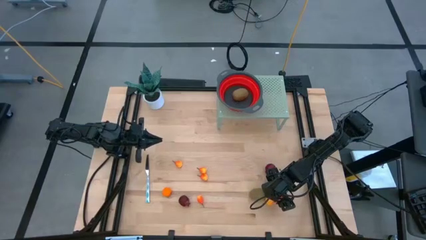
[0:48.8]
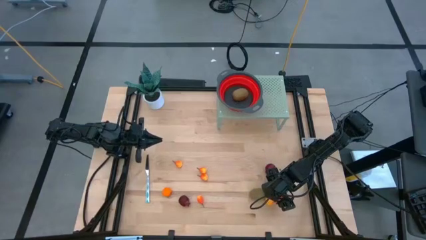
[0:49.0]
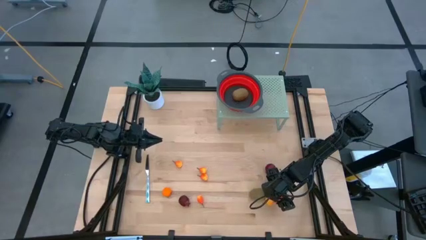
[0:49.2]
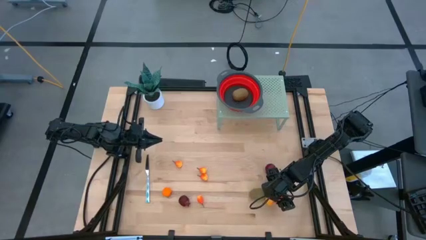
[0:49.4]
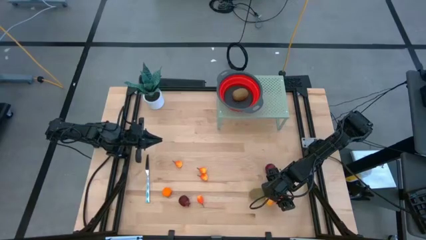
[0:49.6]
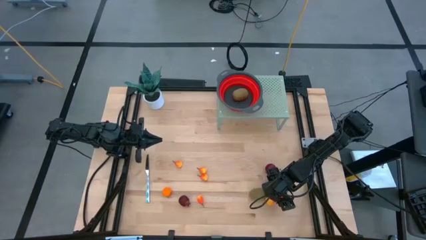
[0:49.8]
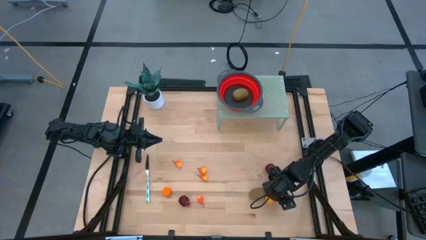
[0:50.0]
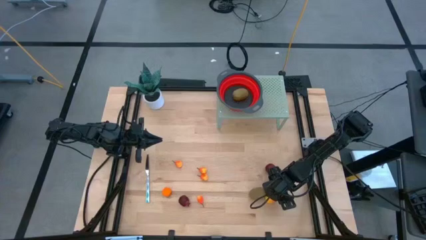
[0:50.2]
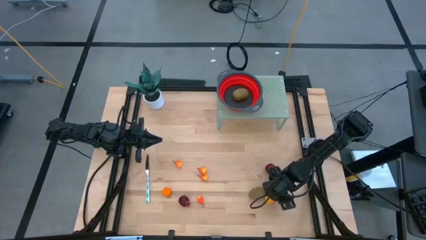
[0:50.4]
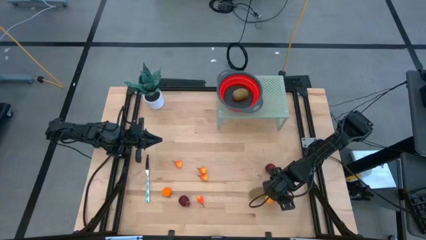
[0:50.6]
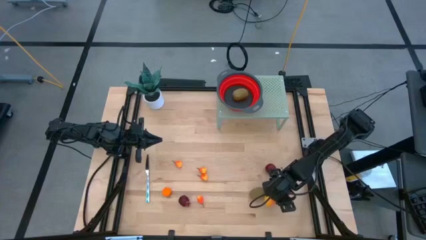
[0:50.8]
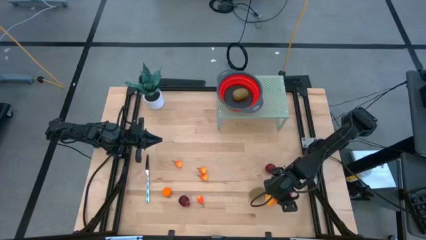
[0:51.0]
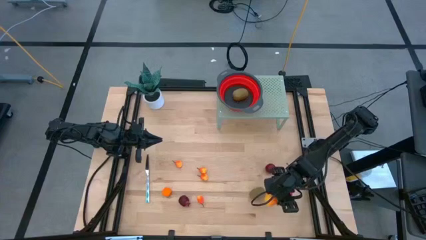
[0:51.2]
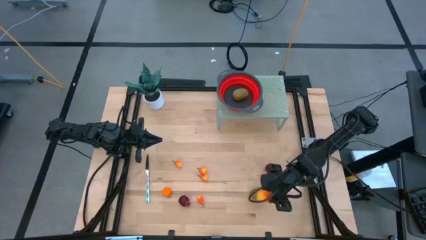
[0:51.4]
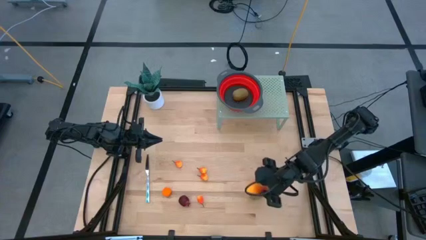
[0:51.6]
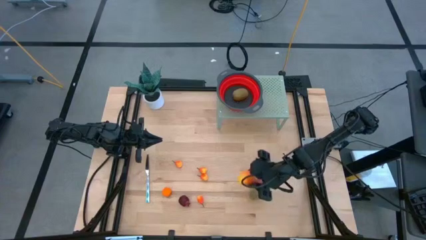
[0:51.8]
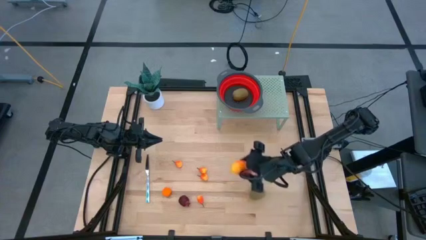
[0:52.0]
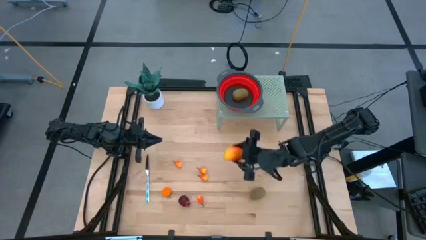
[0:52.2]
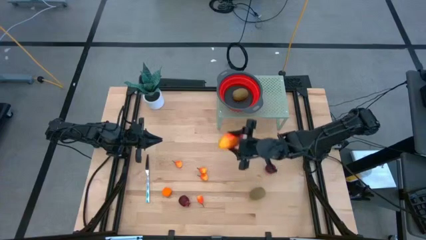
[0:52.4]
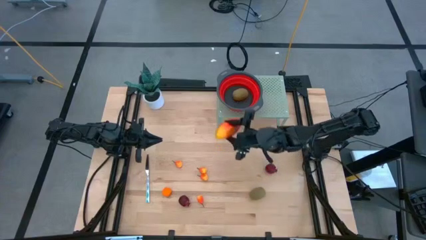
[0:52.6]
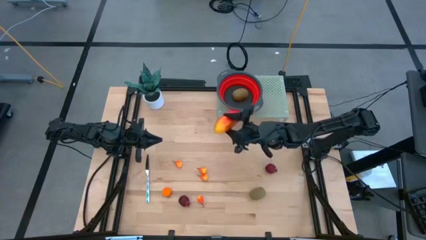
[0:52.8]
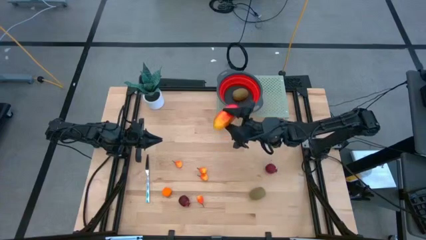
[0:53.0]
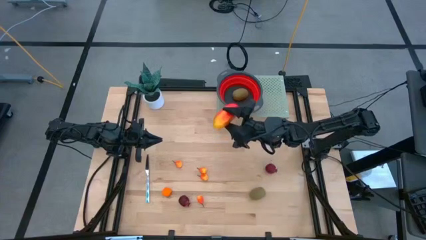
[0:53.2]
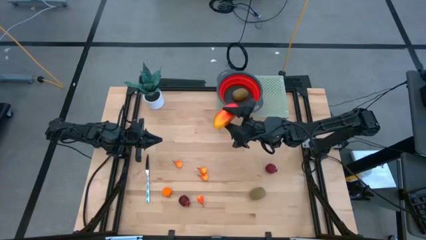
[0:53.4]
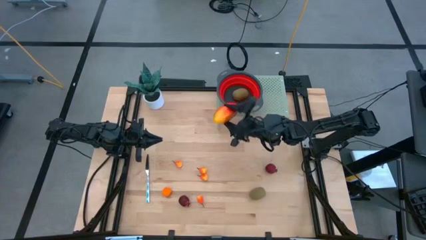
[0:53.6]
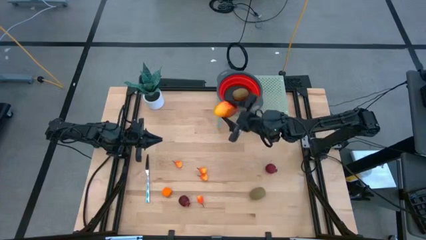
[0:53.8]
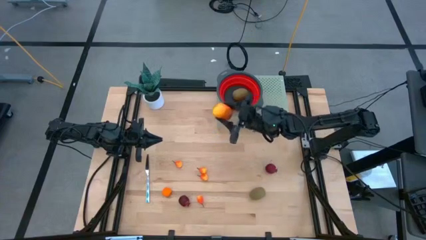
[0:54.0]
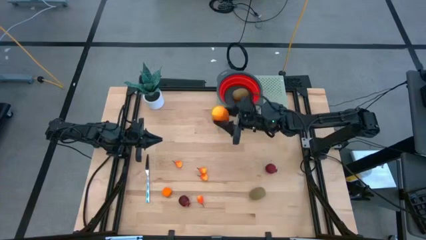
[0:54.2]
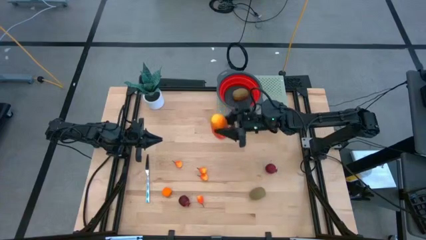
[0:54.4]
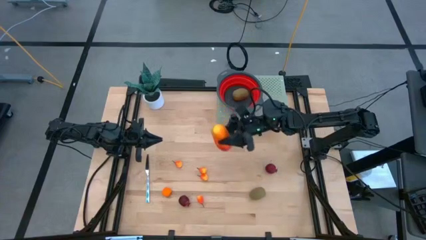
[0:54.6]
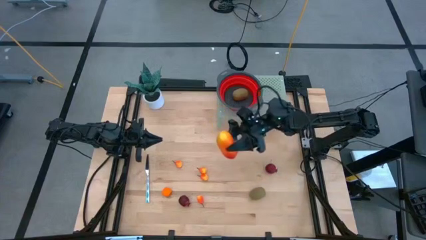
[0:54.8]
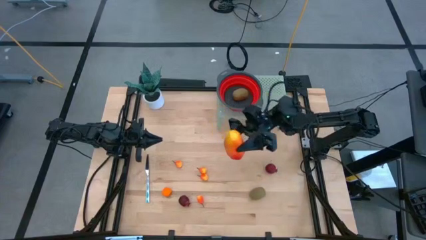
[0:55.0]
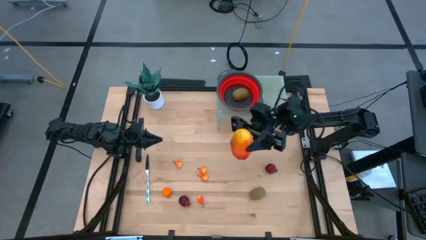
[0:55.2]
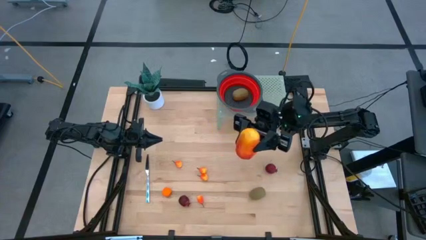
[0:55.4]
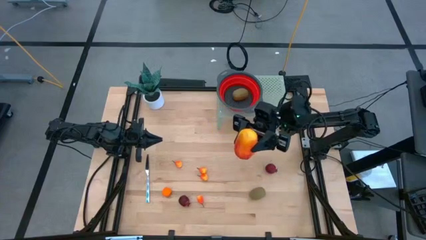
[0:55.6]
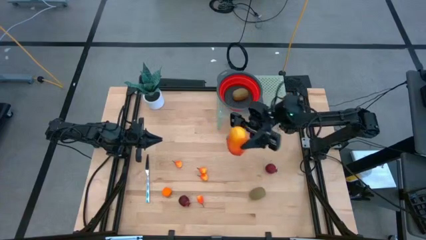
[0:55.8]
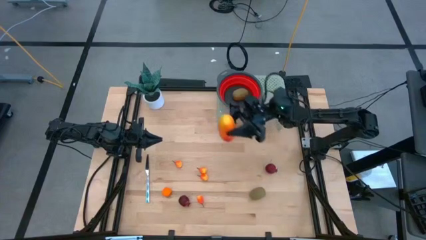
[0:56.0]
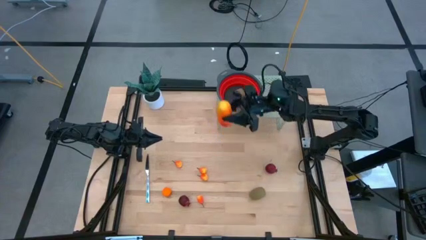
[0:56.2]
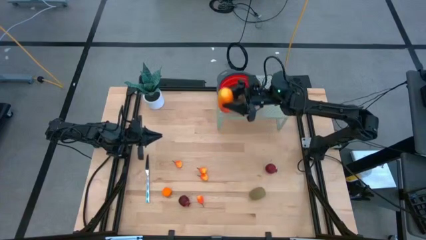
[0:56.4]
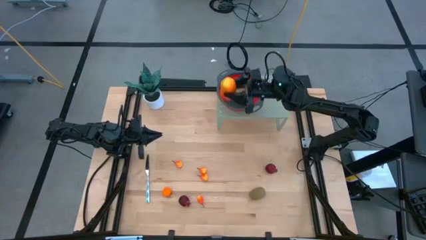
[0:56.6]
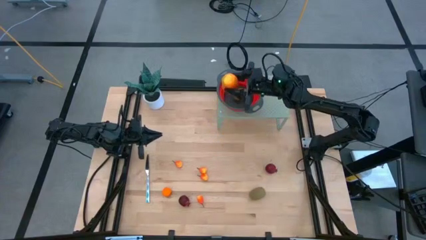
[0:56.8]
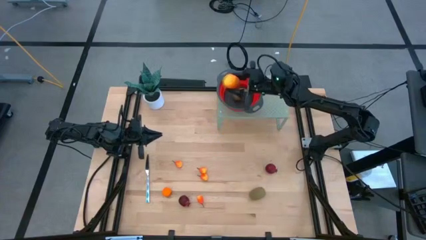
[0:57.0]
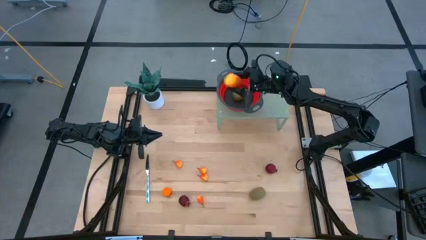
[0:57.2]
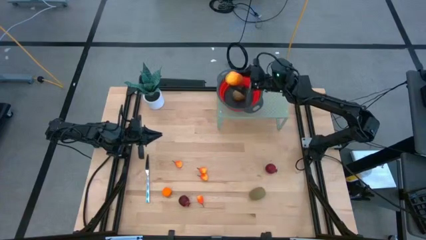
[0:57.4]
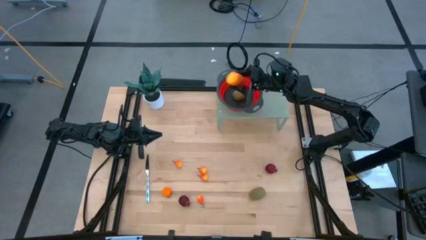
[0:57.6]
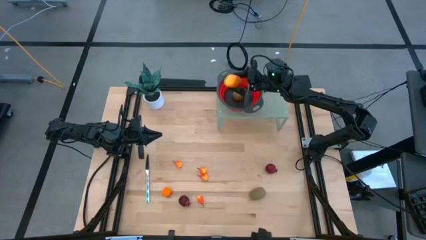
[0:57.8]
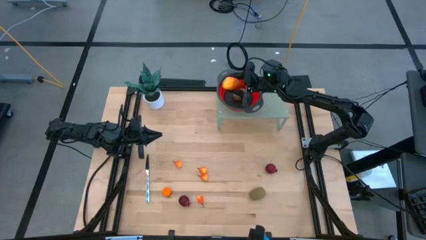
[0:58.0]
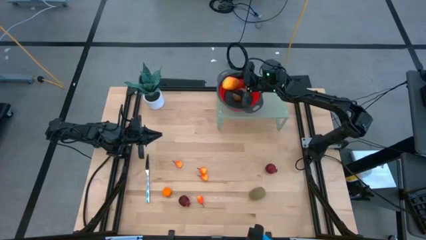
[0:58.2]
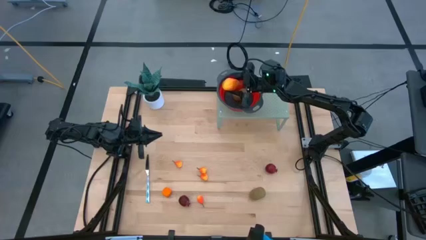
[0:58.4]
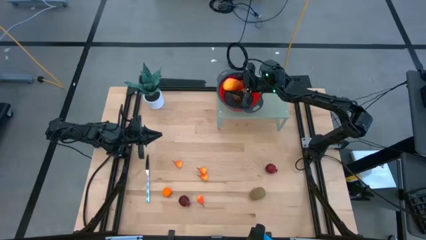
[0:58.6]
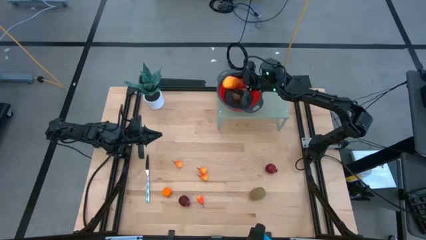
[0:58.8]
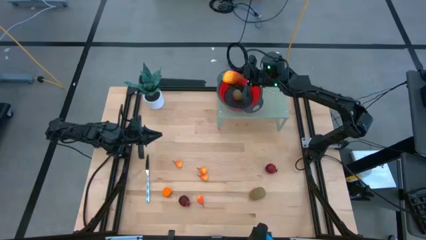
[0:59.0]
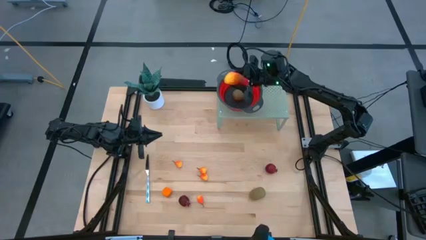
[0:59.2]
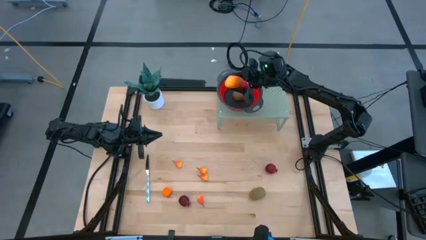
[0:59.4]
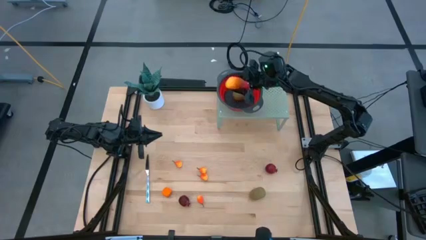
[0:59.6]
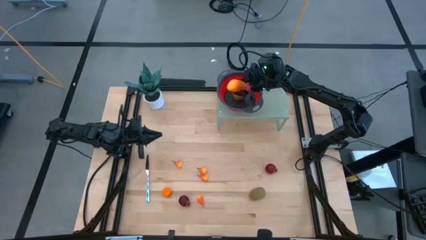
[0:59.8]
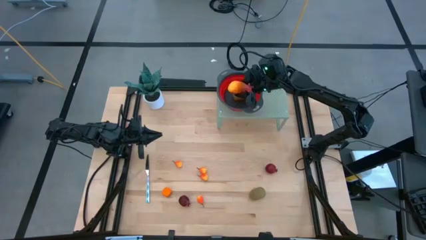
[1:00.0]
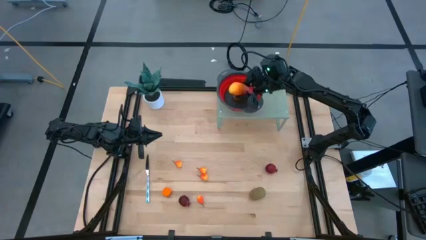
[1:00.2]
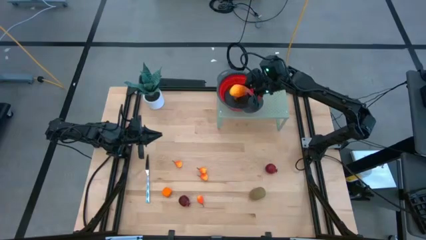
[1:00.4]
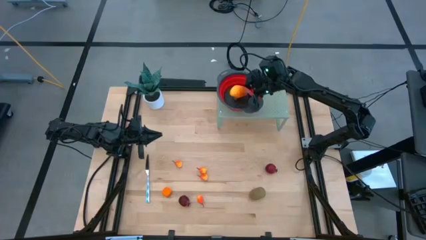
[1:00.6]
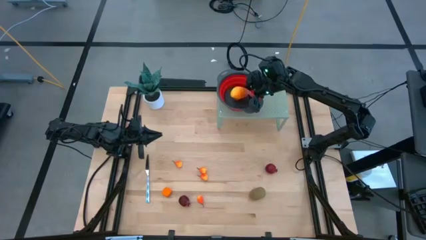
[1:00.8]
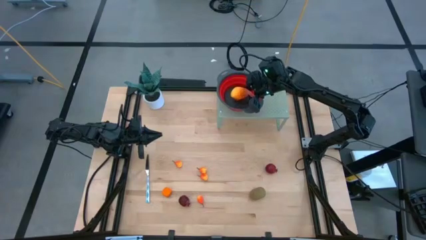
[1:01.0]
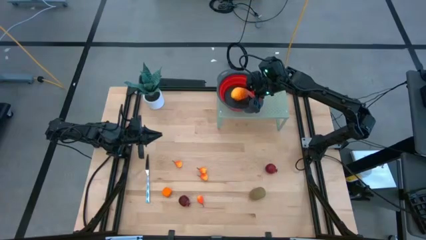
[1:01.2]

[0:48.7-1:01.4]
Task: Pick & Place Fruit
Put the orange mango into the red strainer bowl on the shelf
